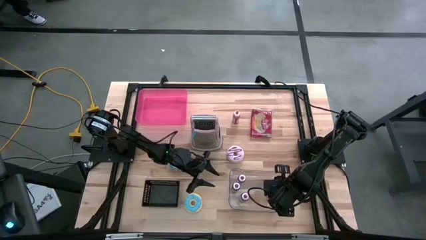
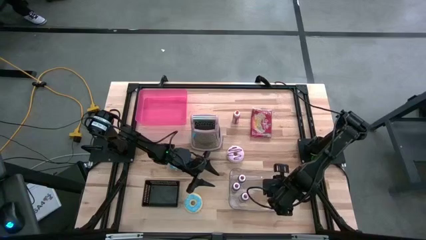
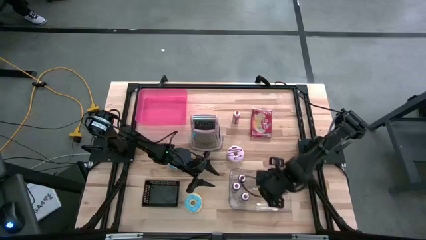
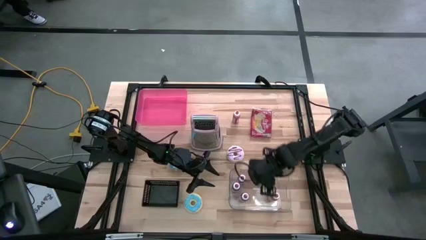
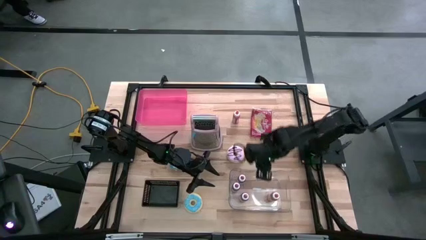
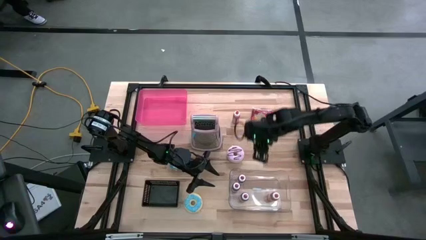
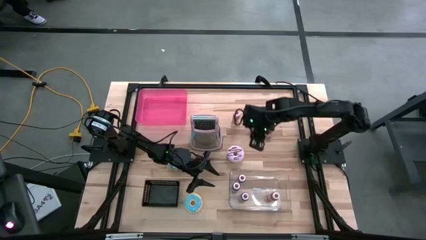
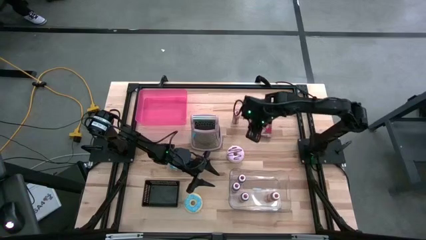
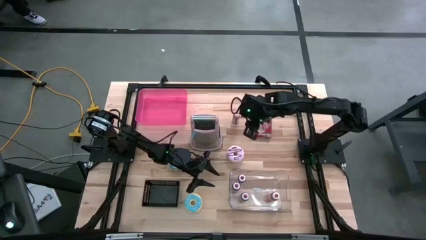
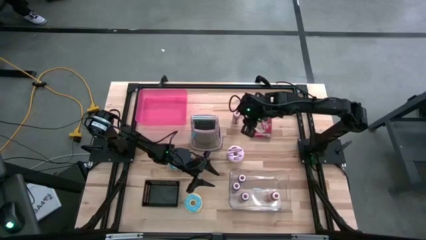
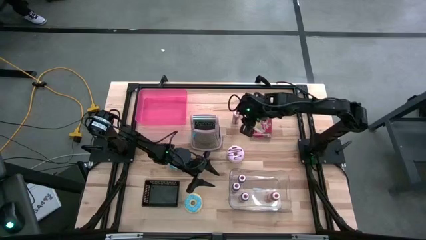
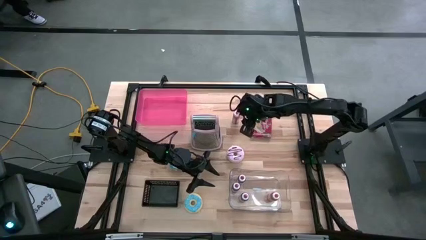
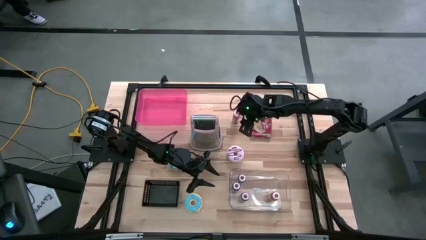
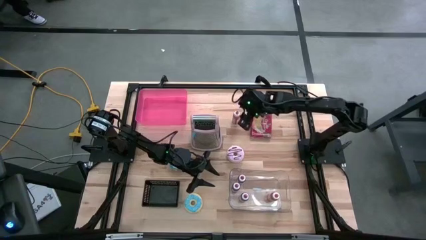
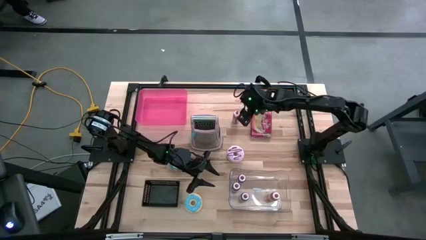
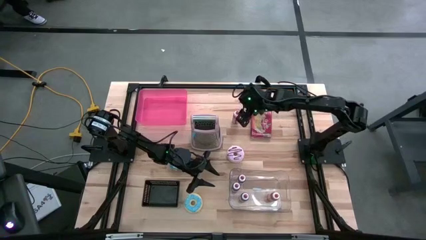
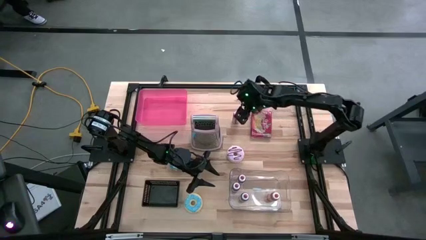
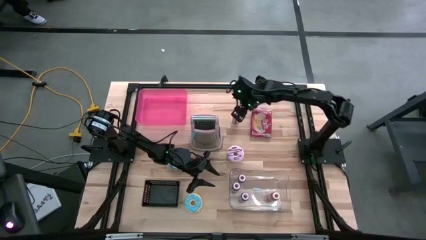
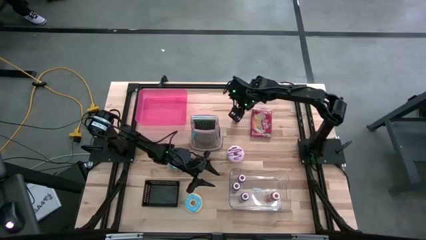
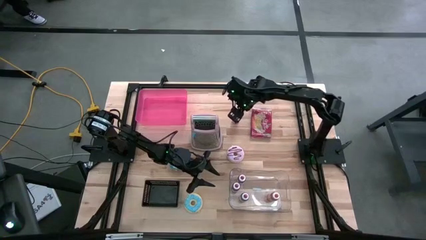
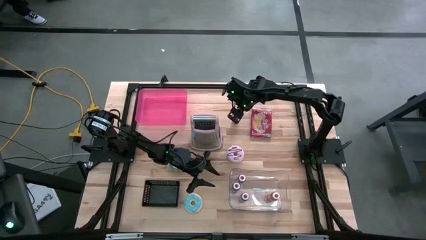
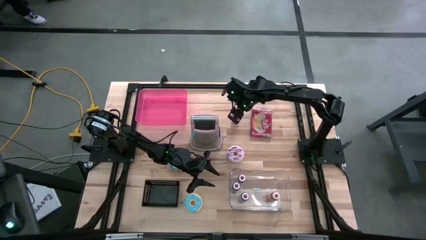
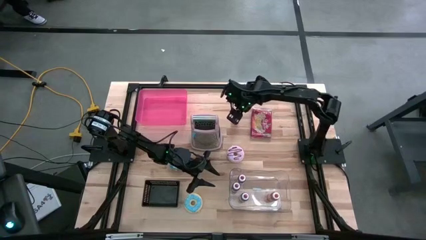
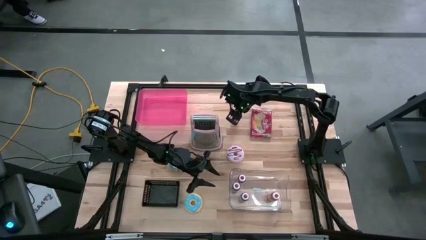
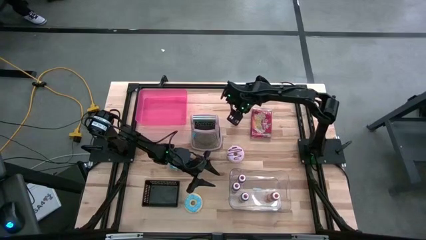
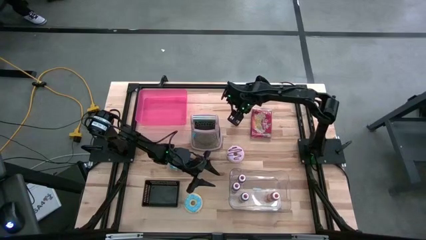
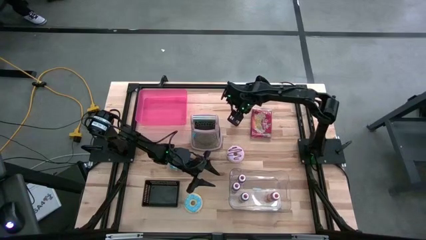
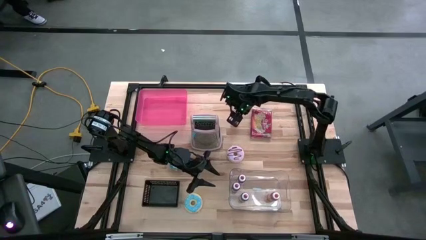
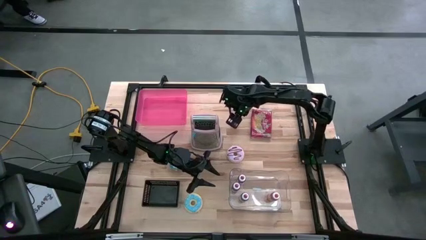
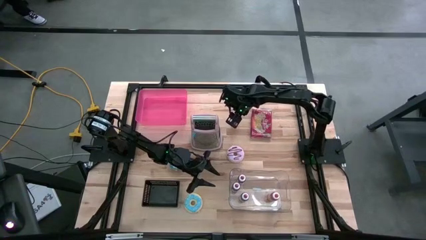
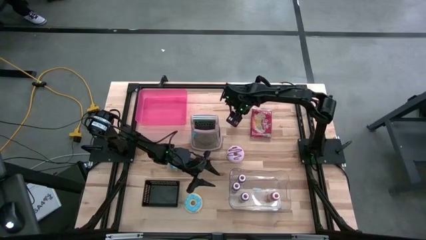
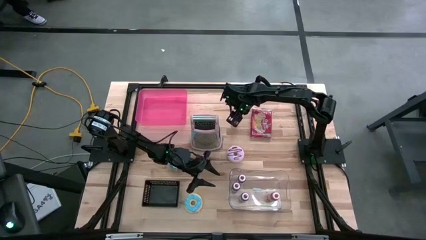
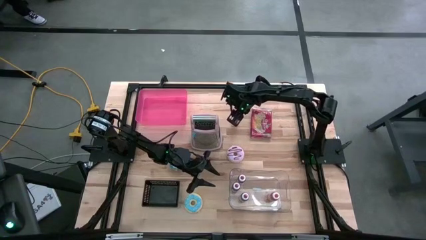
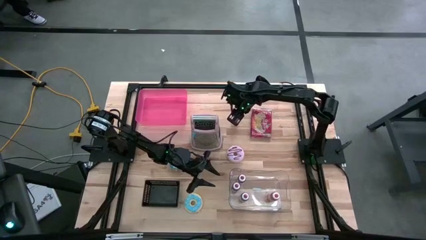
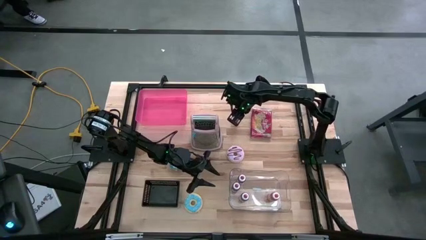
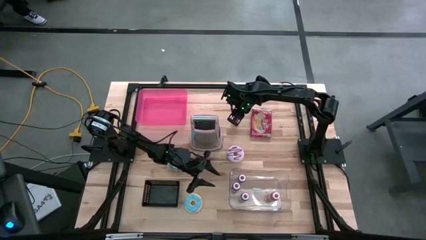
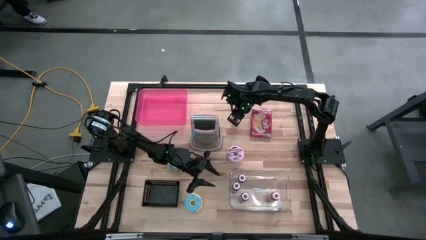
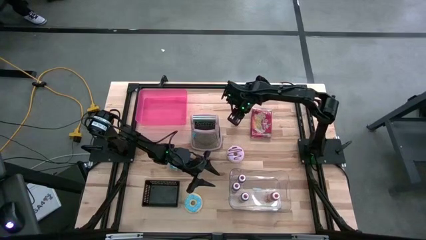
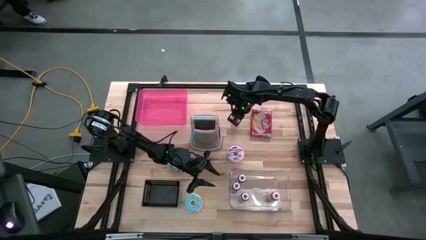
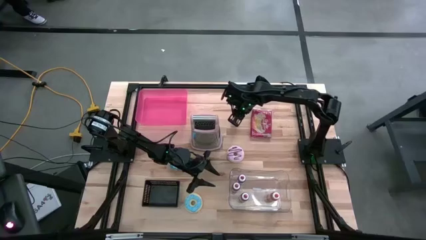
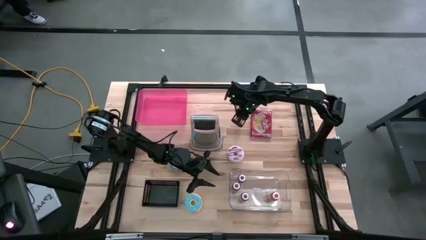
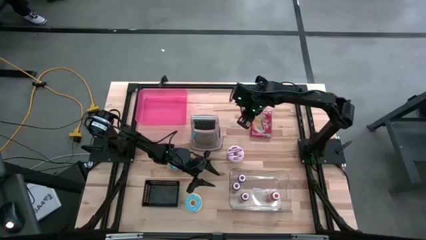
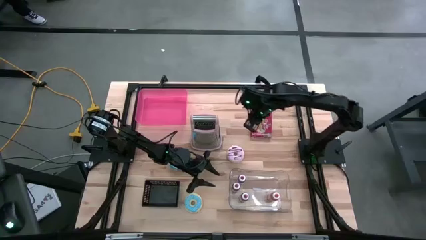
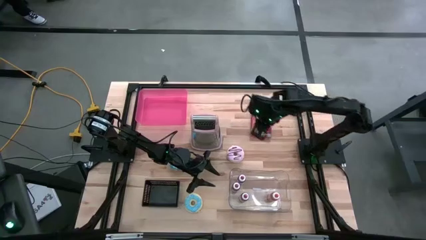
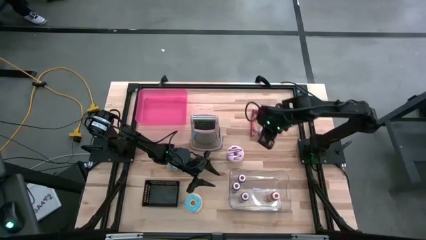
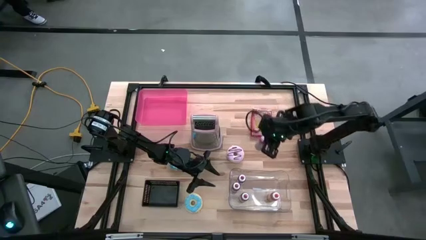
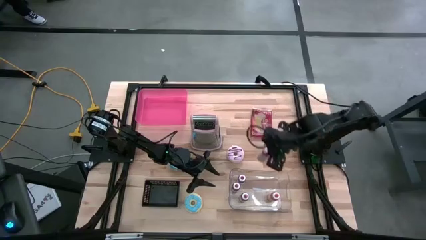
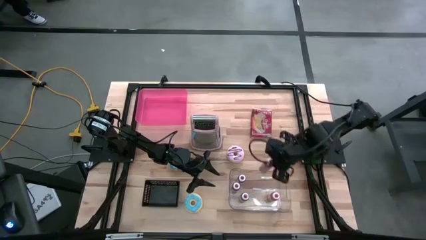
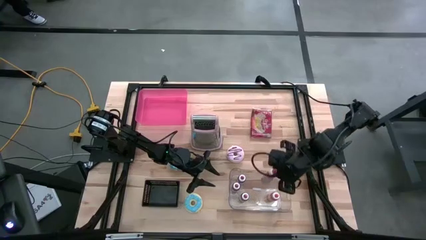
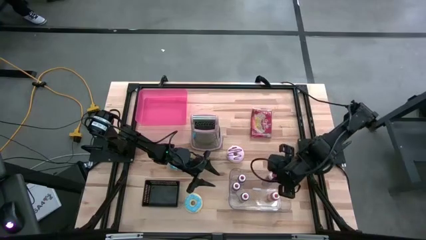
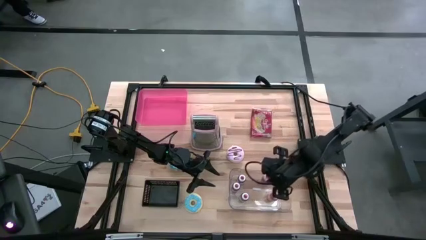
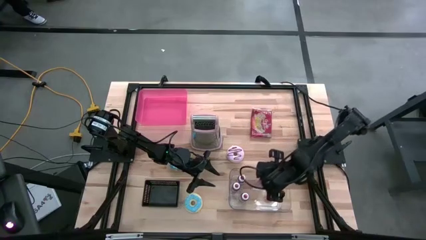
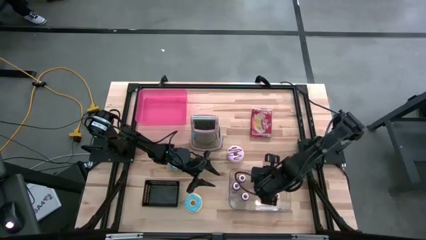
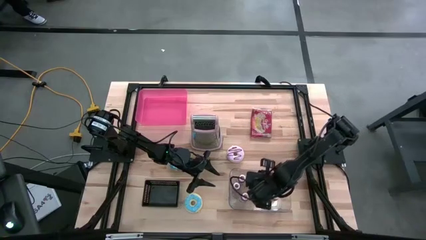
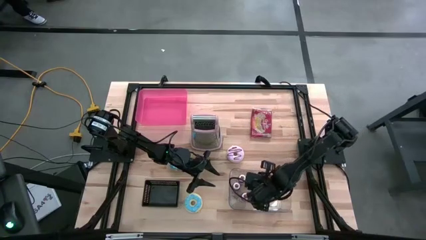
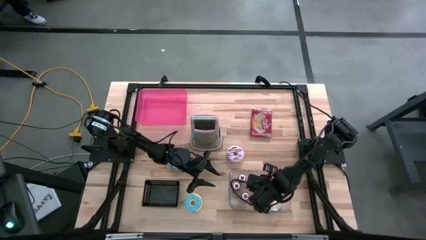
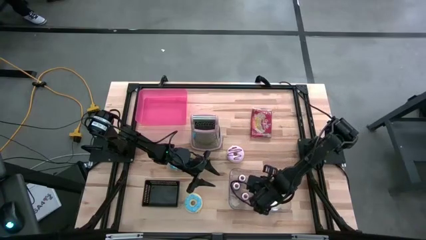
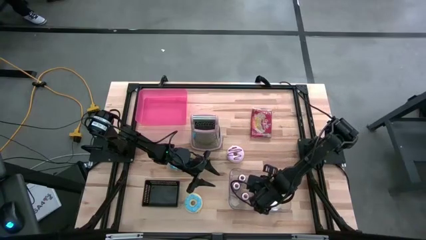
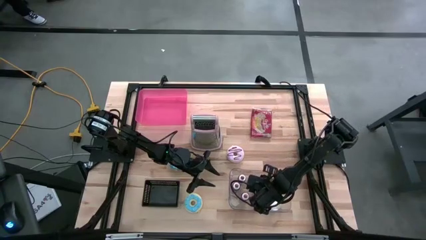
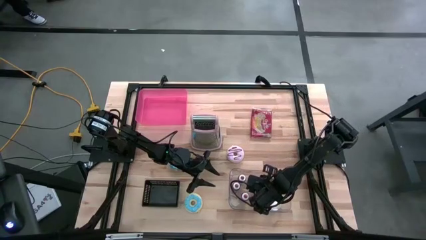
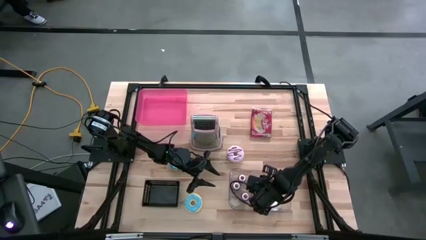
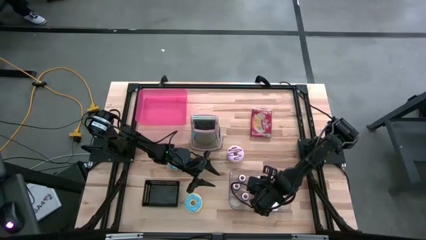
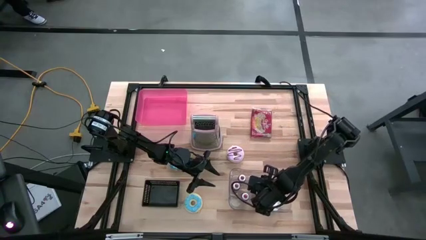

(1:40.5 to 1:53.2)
Task: Pick & Place Food Item
Put the orange food coloring bottle into the transparent bin

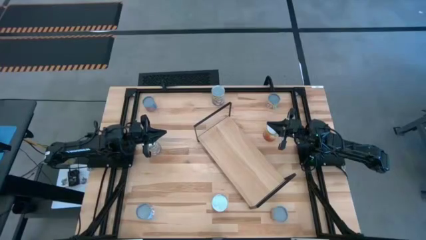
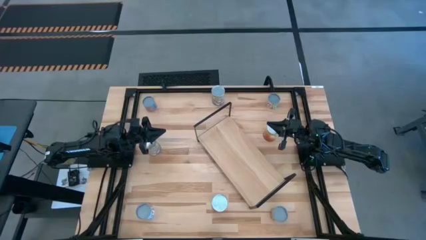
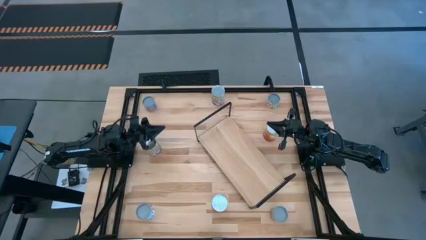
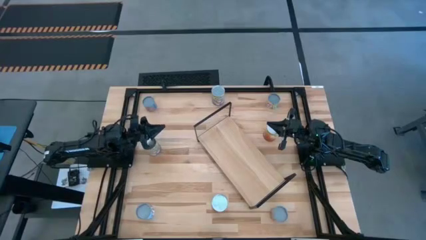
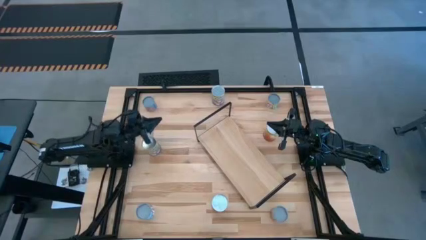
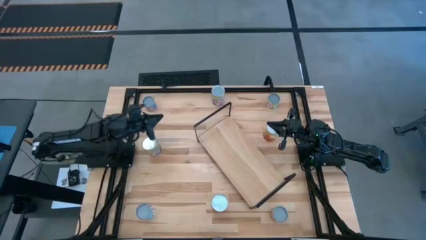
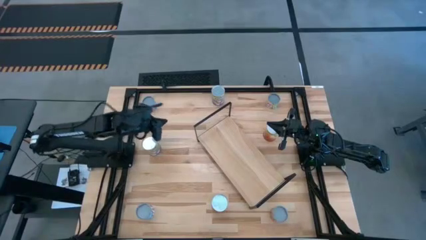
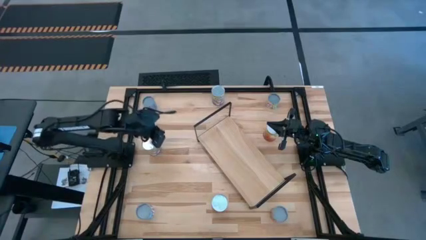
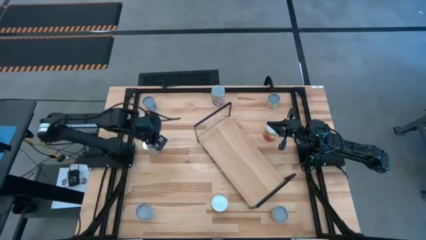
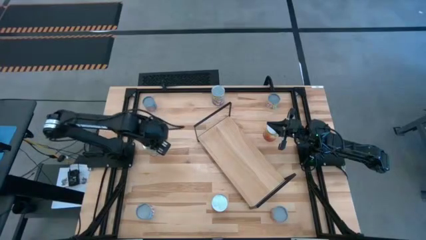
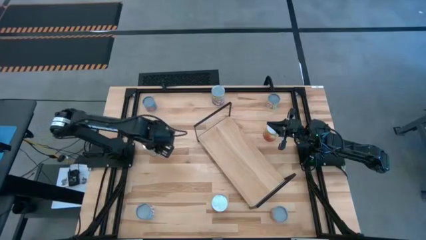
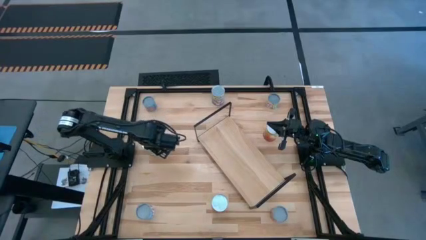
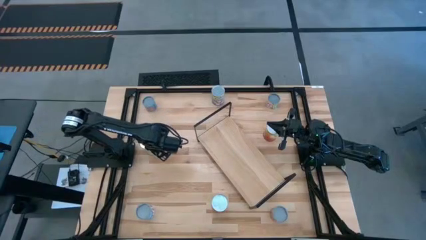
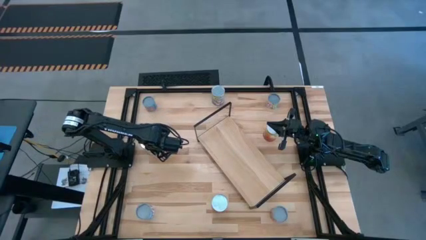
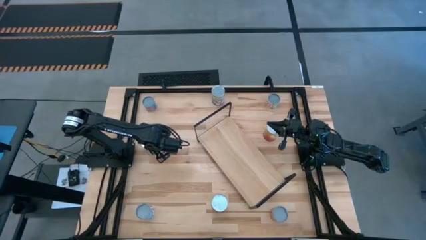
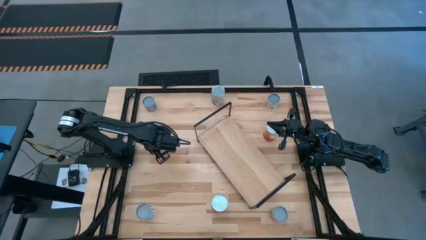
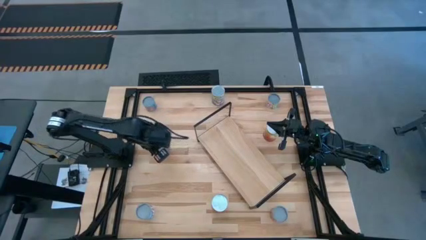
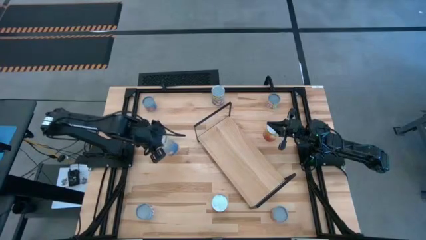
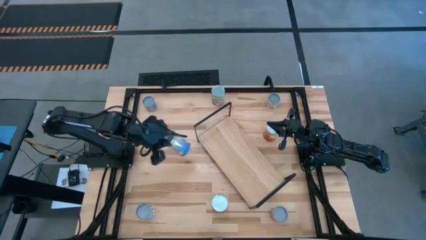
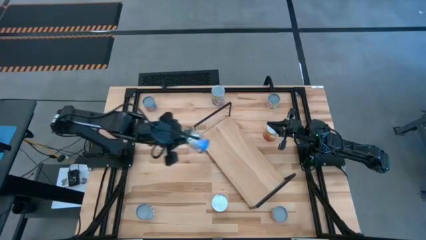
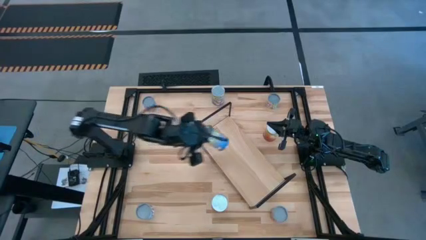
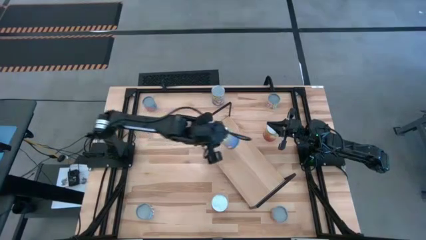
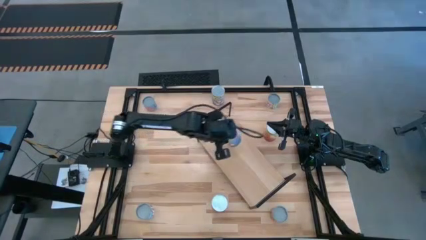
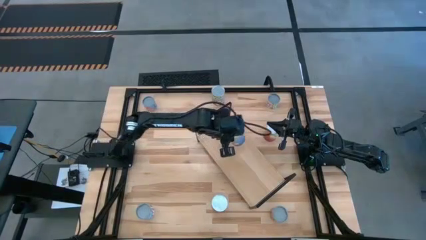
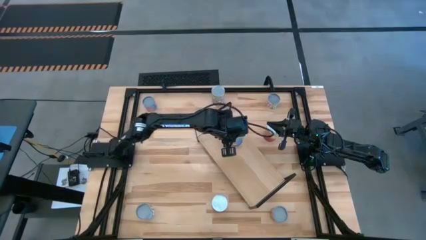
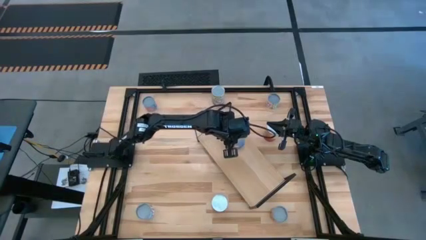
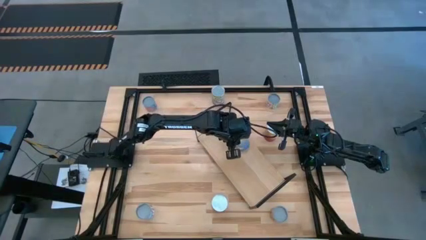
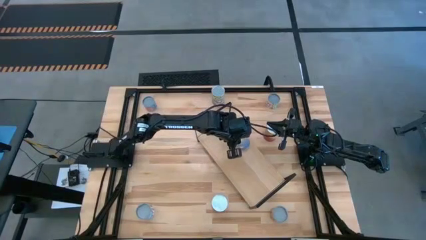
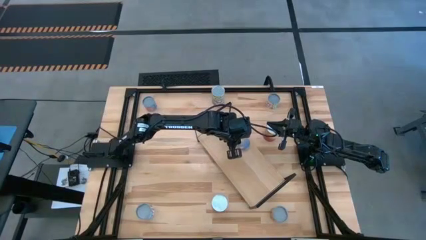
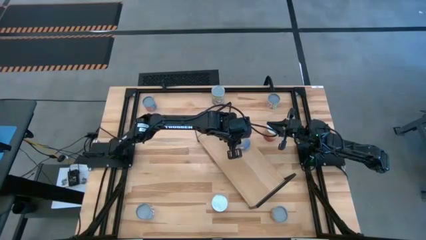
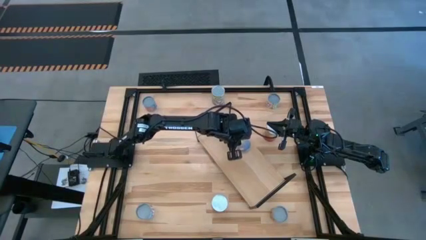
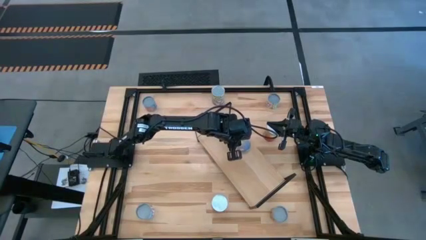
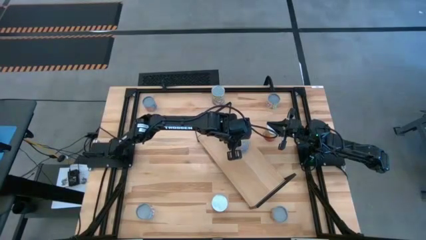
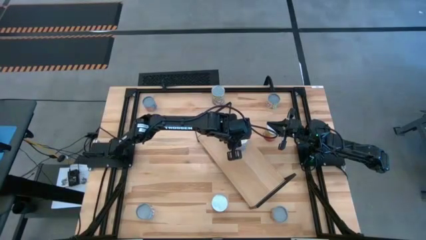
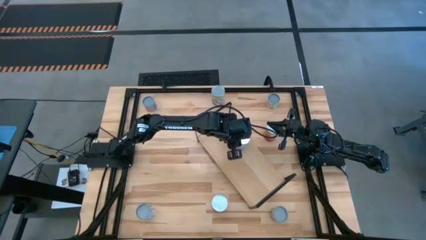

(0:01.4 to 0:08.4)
Task: Pick and place cans onto a shelf
Put the bottom canned peaches on the shelf
